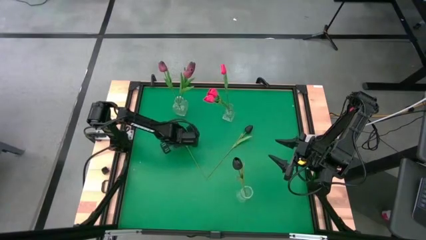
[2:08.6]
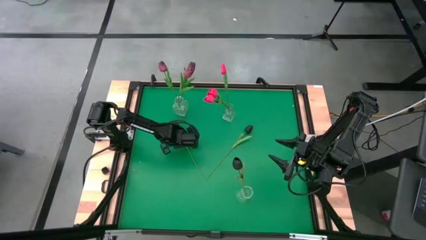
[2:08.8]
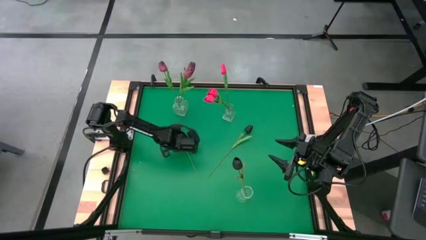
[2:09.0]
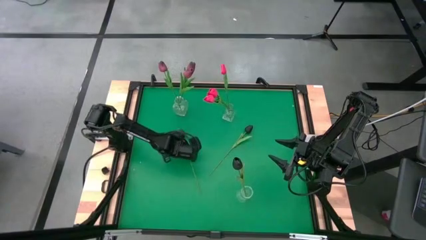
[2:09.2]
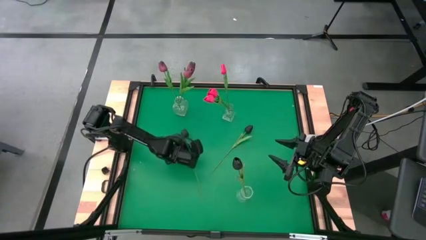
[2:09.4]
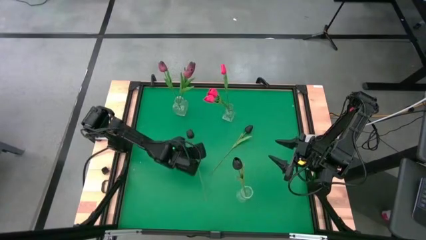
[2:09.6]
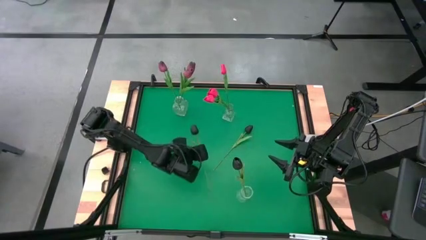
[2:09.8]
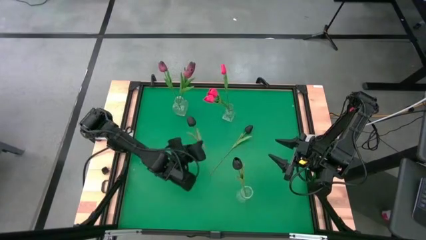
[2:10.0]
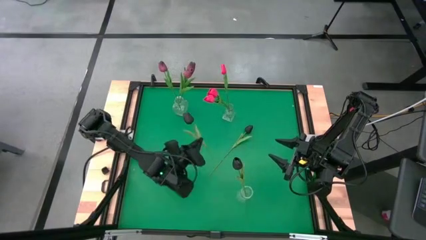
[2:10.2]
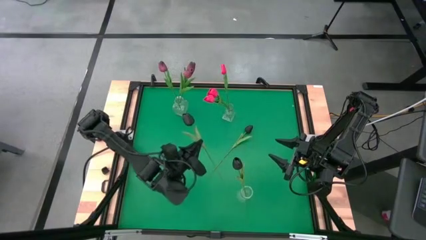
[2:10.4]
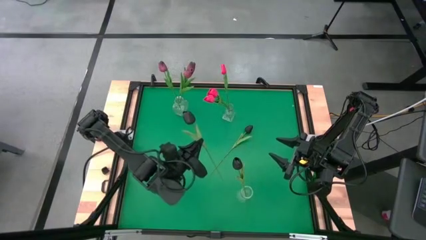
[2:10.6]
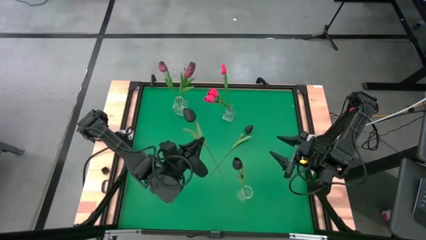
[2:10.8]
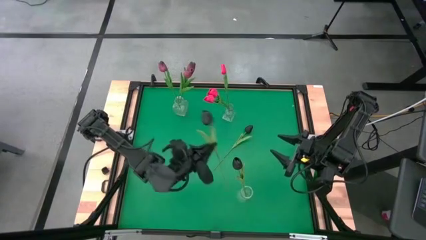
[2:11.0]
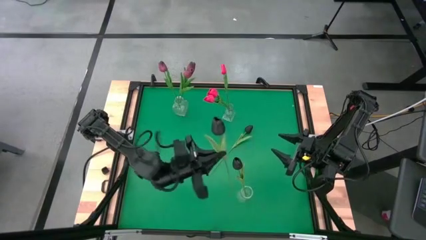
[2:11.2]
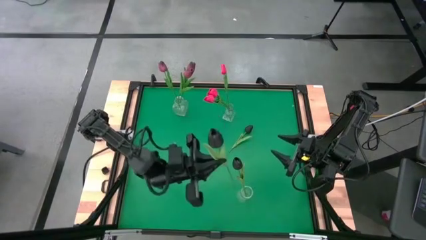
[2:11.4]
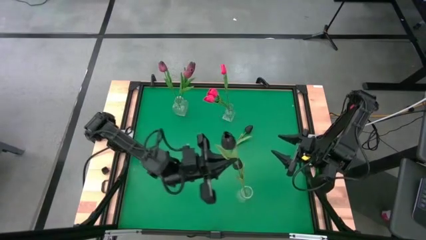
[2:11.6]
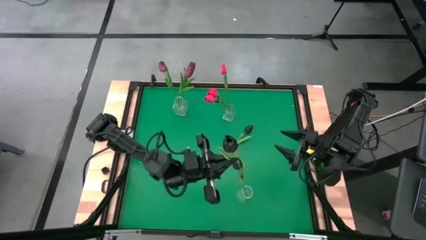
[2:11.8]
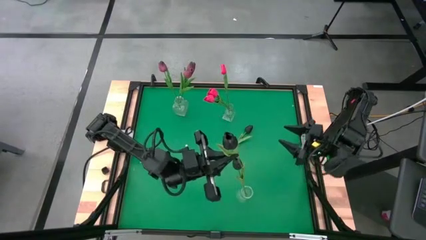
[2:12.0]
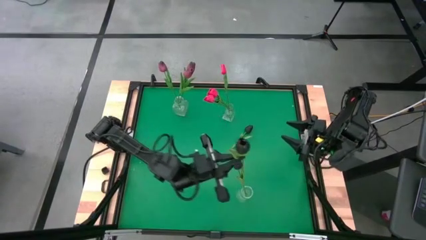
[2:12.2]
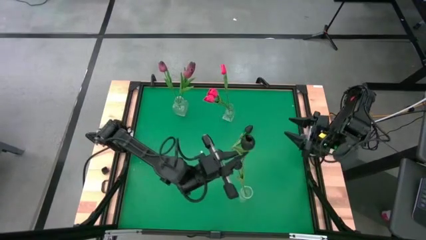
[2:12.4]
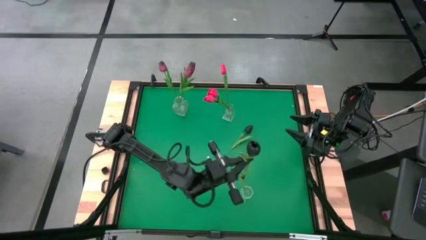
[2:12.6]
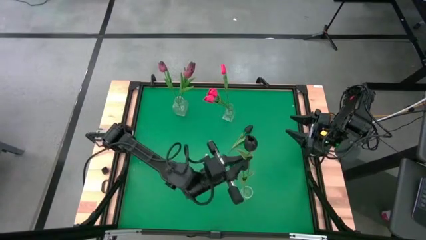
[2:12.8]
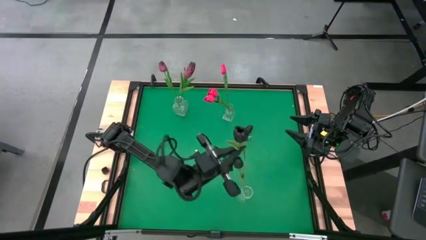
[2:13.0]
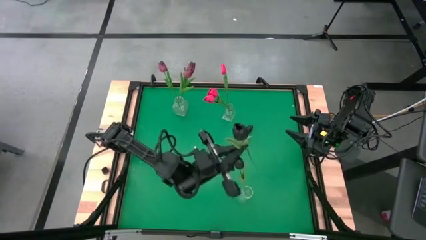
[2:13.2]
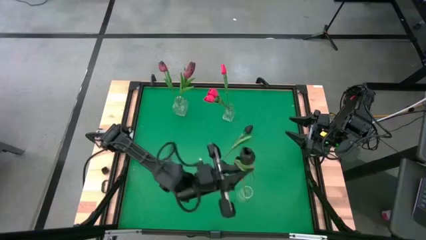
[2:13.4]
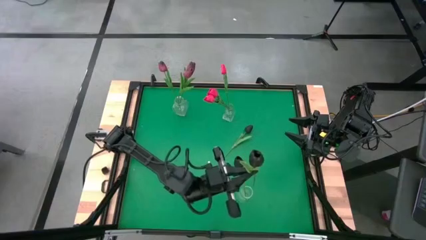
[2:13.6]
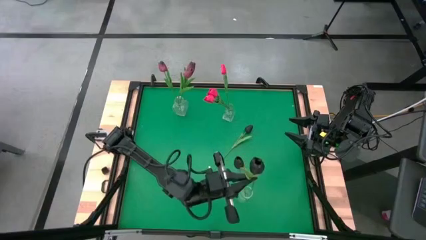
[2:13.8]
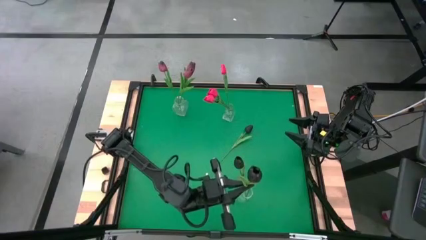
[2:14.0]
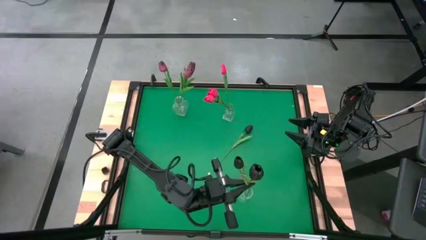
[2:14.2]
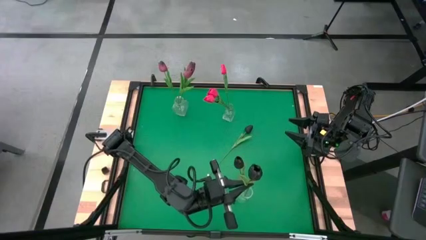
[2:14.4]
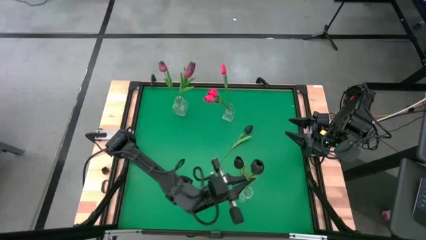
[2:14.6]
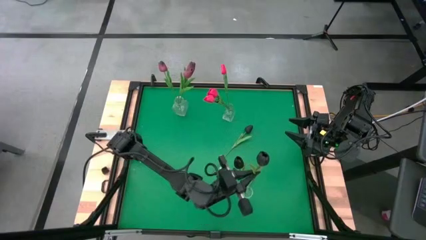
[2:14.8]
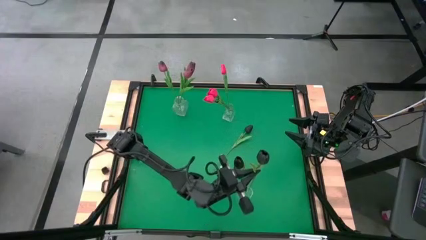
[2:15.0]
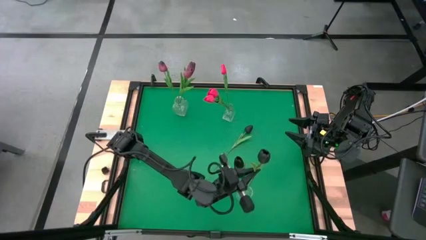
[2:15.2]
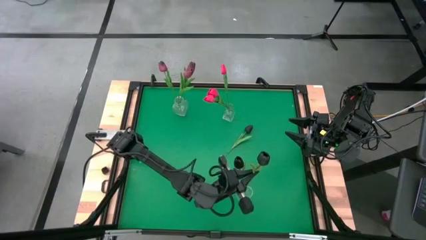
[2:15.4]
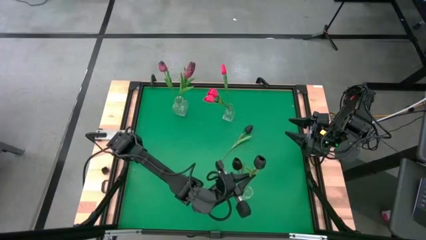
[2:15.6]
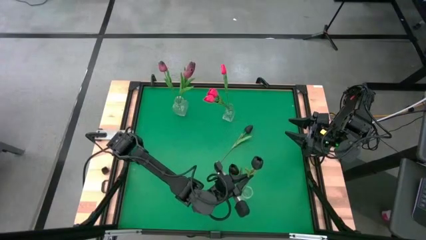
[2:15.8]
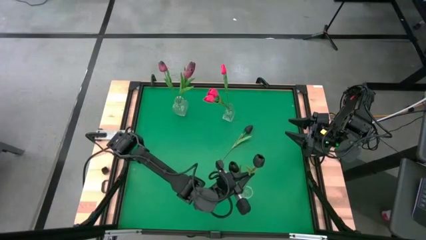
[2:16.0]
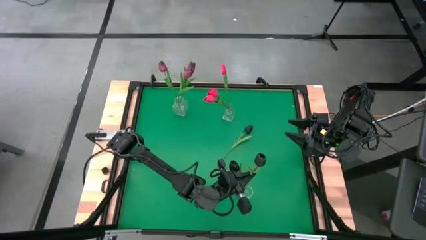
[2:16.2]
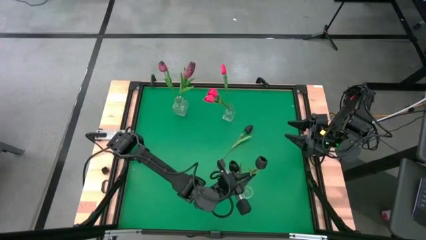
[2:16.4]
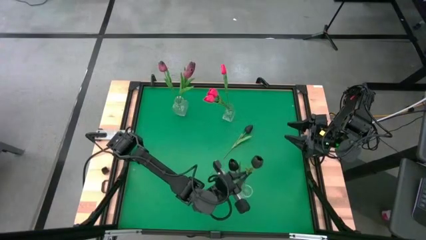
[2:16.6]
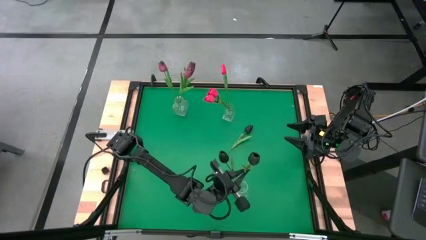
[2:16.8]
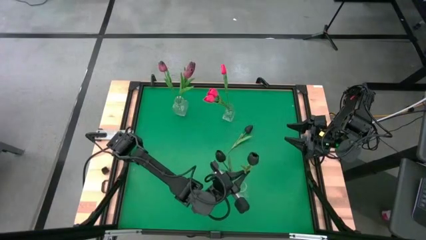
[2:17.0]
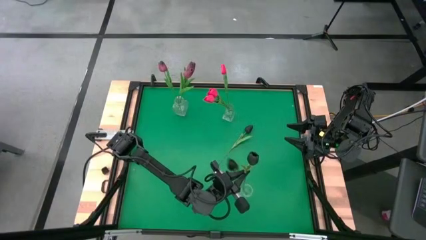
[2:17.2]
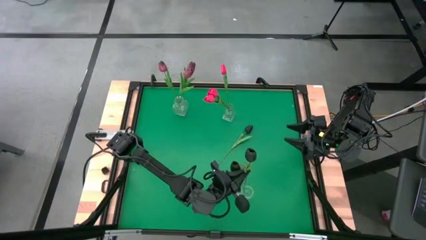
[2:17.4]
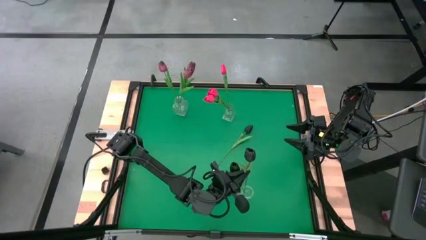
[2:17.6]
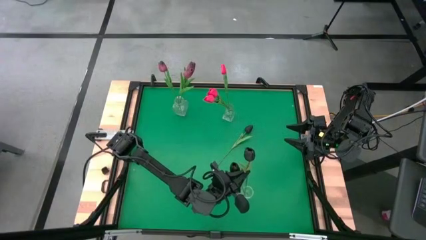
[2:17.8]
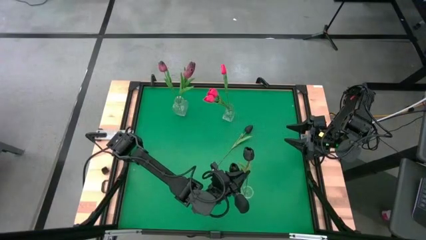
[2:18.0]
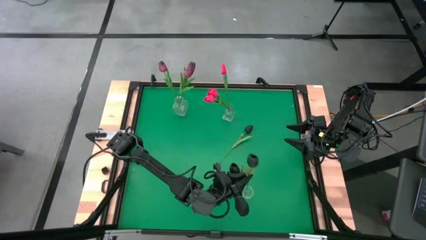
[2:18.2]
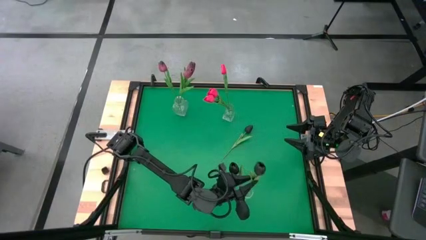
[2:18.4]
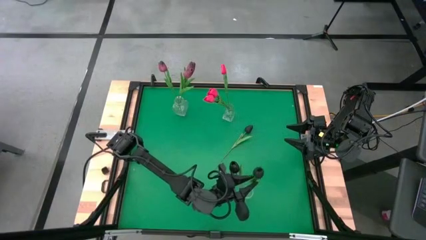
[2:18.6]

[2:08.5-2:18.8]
Task: Sort flowers into vase by color
Put the left black tulip into the bottom transparent vase

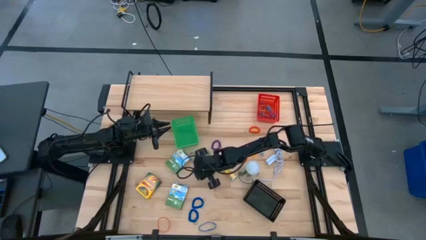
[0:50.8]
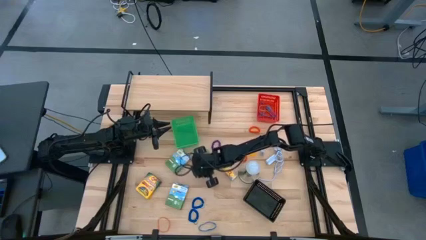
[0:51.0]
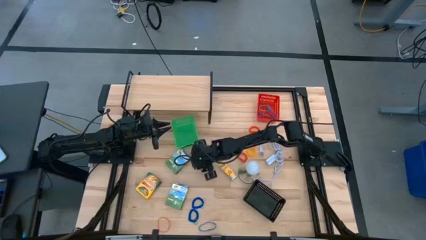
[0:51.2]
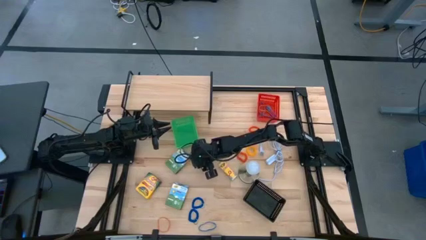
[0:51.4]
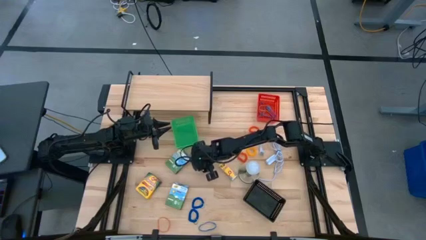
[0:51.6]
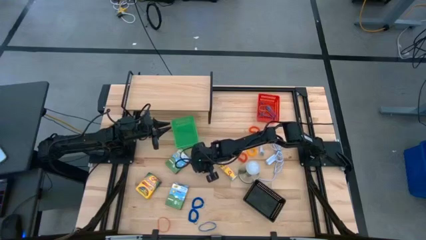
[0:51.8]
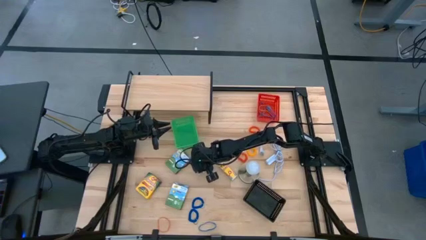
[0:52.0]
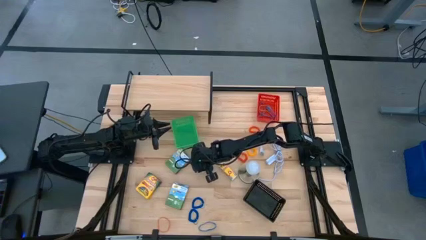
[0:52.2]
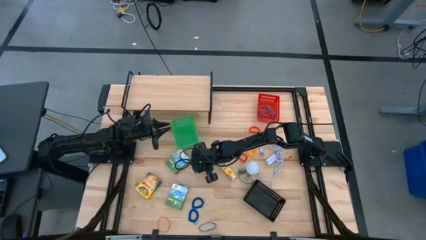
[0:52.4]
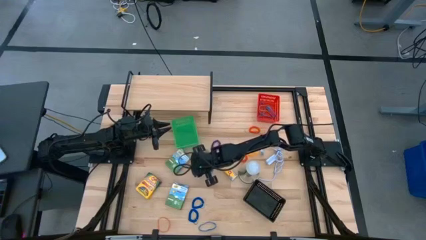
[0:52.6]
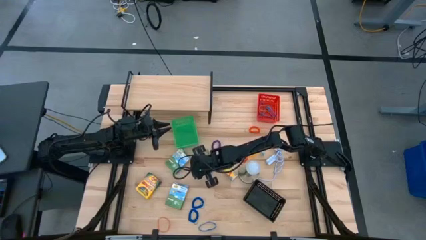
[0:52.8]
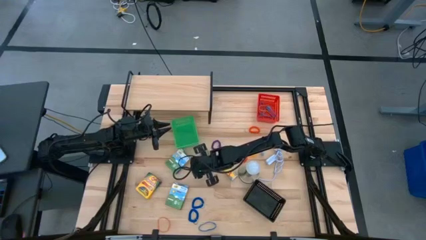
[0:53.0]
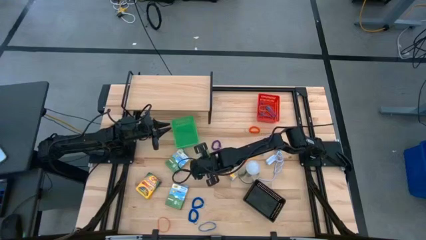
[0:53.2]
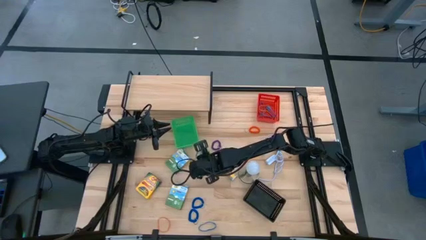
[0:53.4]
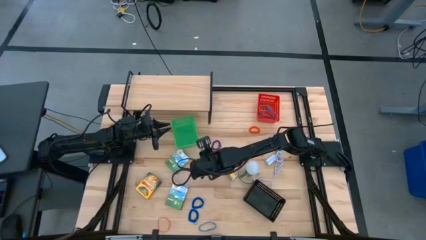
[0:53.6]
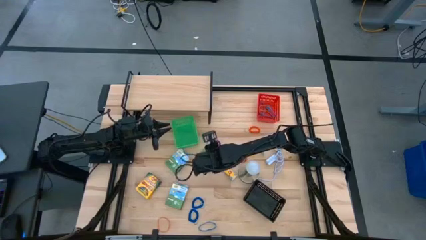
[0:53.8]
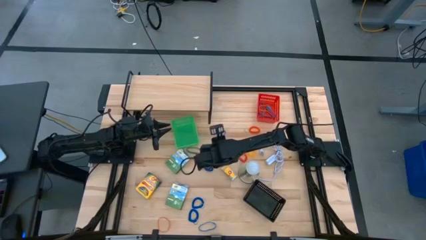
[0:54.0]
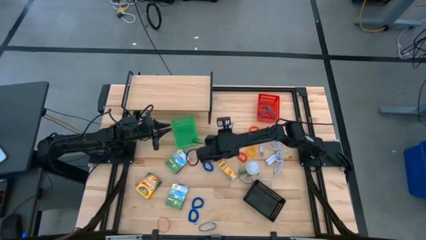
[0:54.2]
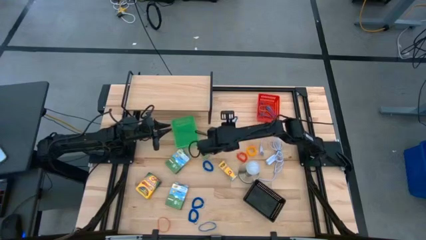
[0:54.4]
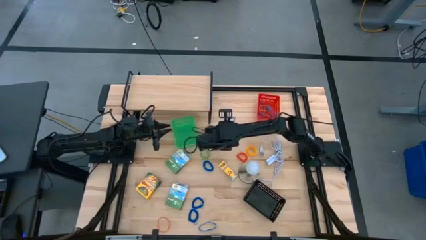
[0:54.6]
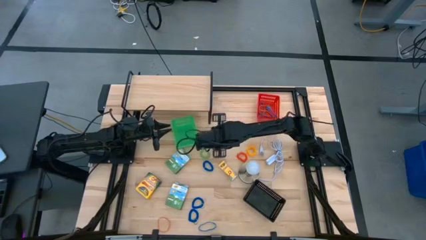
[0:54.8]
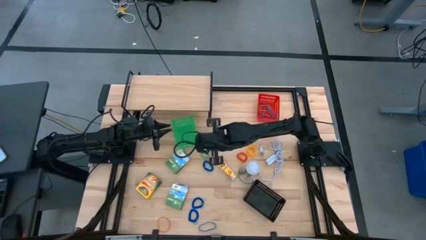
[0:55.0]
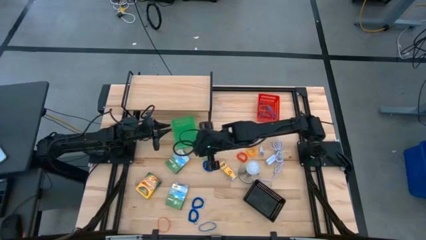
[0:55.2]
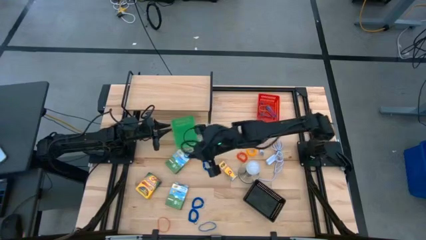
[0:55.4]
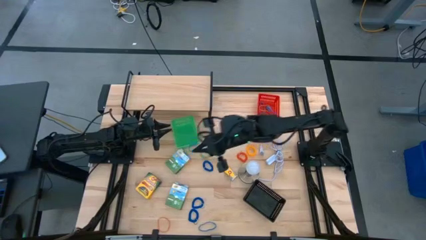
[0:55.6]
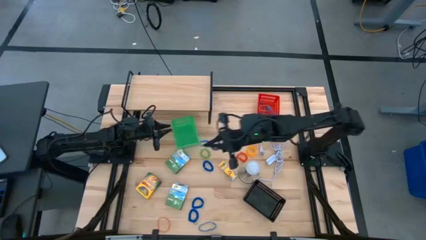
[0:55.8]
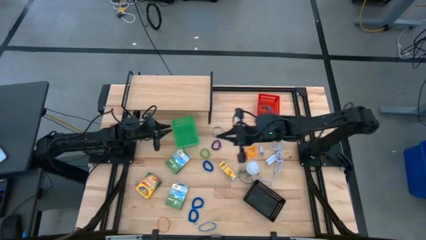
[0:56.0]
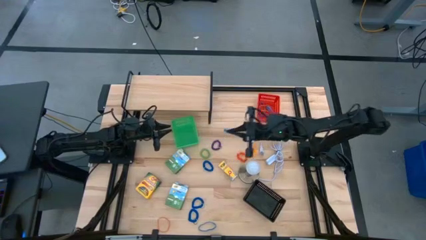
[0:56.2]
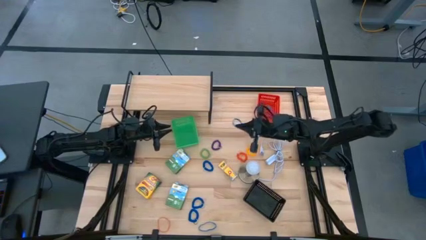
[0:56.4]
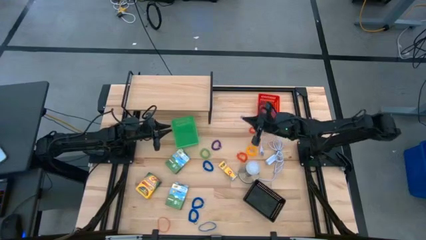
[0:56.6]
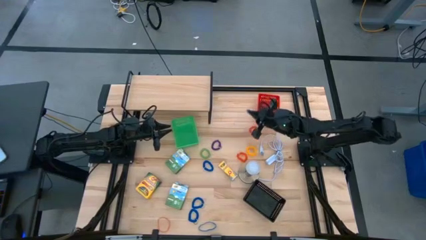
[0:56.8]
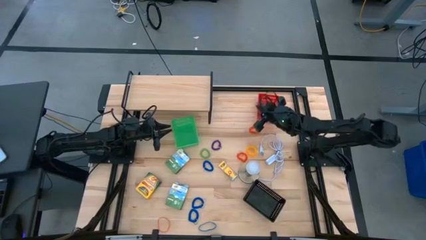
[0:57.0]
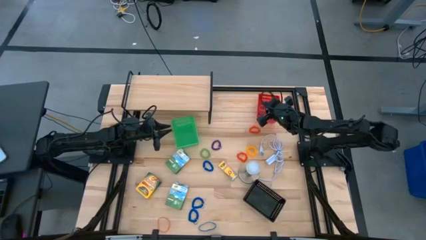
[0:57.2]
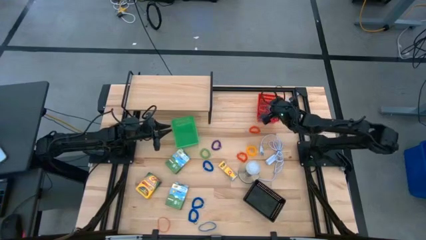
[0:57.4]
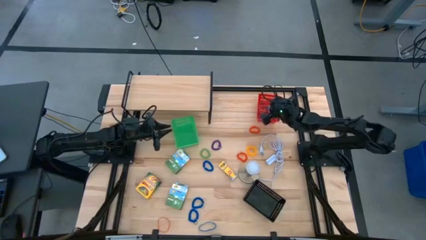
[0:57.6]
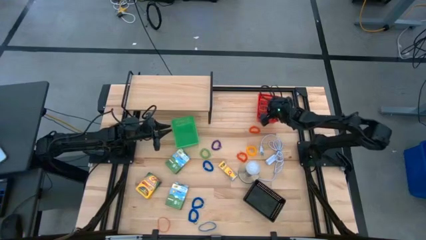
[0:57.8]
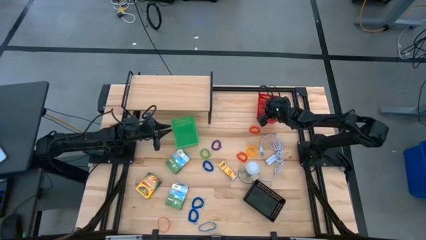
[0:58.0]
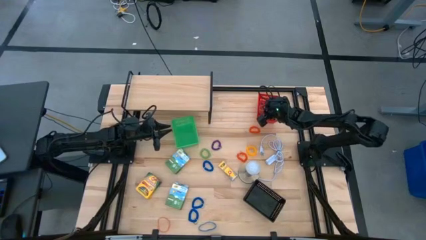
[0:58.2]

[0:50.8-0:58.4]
Task: Pick & Place Office Desk Supplies
Put the blue rubber band into the red basket
